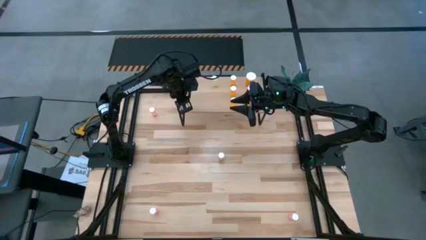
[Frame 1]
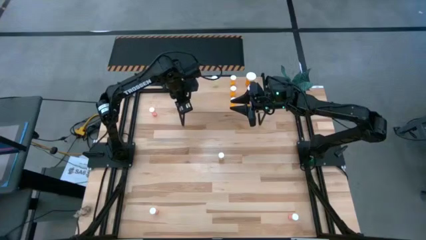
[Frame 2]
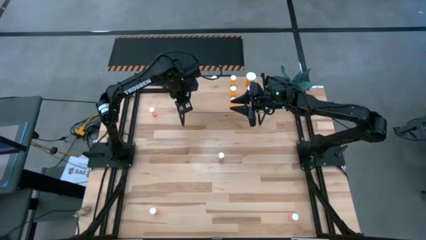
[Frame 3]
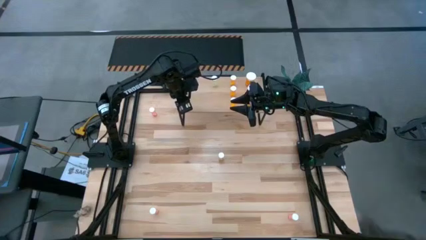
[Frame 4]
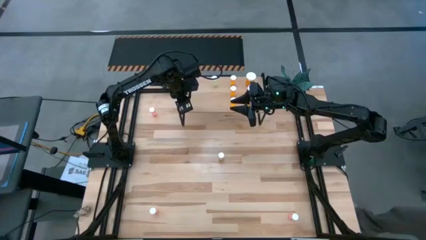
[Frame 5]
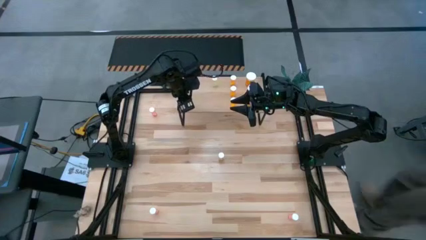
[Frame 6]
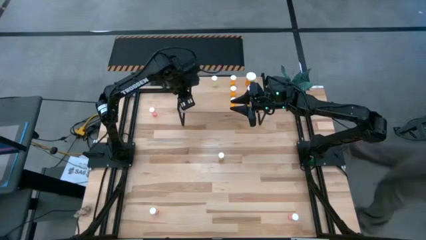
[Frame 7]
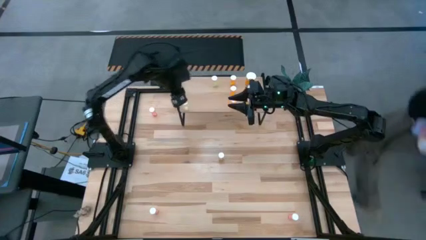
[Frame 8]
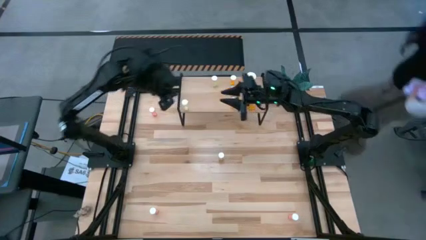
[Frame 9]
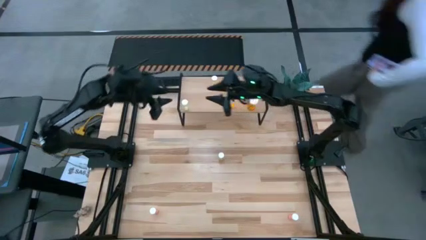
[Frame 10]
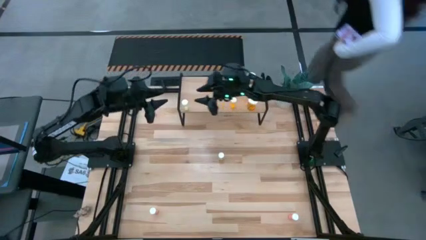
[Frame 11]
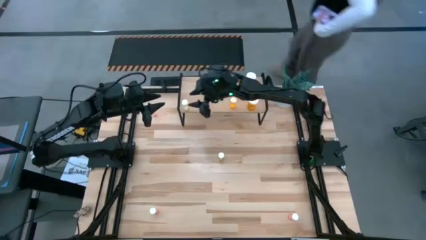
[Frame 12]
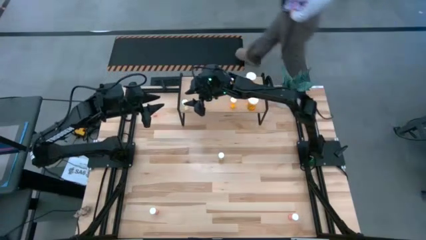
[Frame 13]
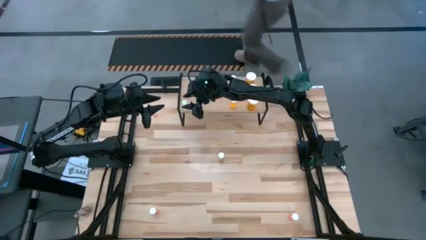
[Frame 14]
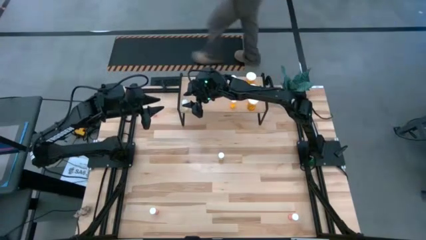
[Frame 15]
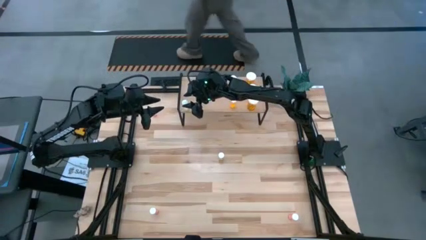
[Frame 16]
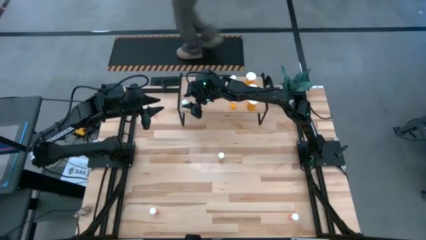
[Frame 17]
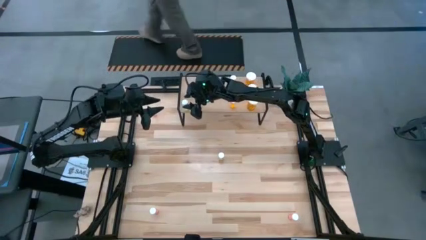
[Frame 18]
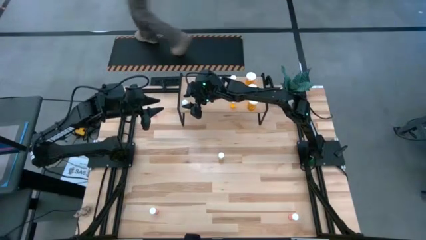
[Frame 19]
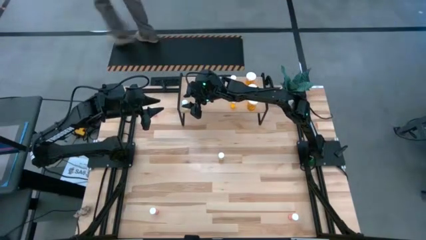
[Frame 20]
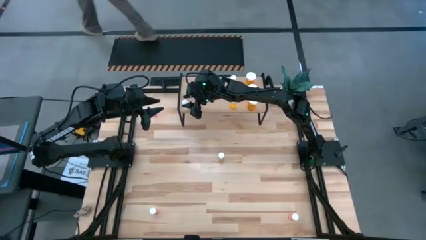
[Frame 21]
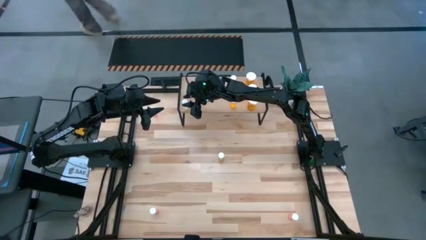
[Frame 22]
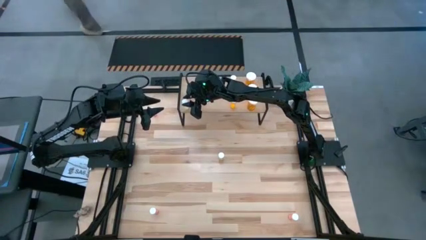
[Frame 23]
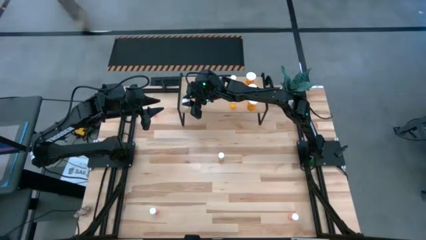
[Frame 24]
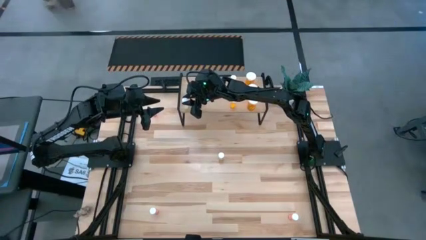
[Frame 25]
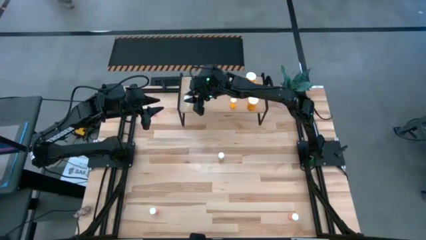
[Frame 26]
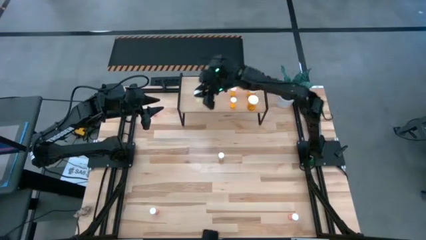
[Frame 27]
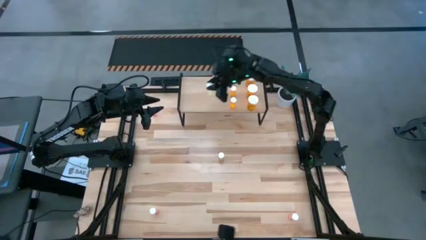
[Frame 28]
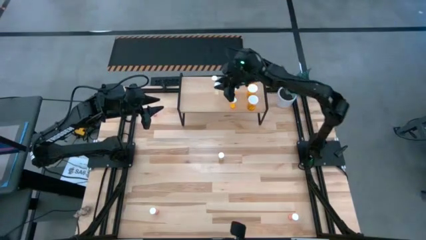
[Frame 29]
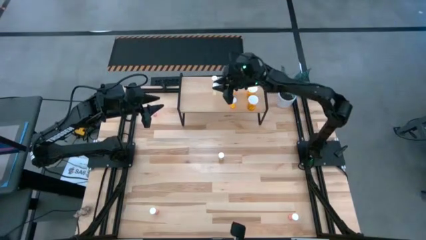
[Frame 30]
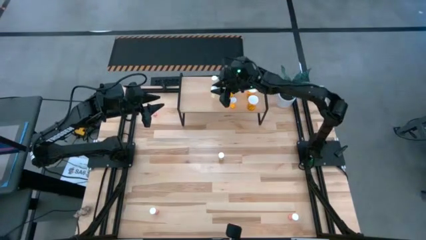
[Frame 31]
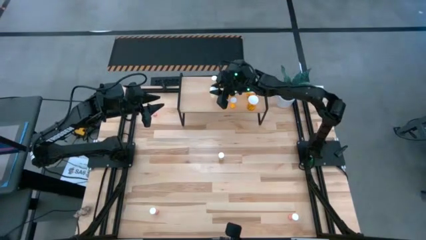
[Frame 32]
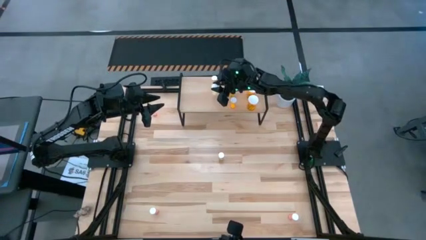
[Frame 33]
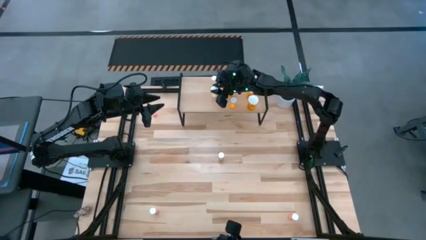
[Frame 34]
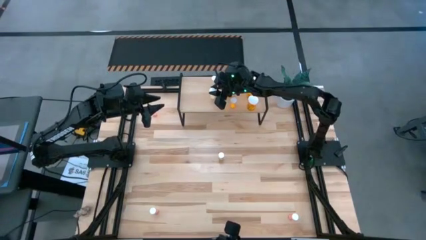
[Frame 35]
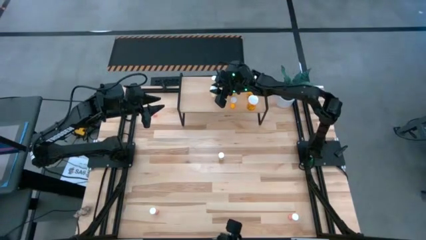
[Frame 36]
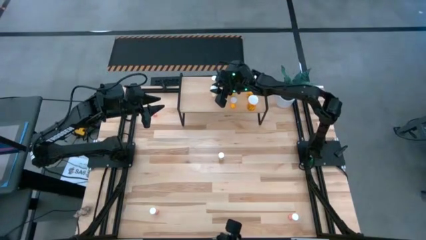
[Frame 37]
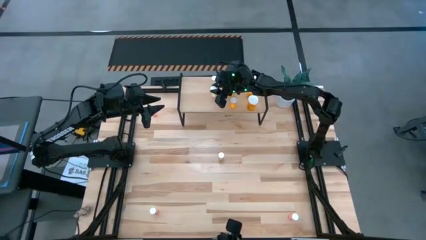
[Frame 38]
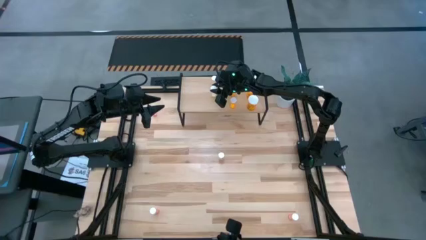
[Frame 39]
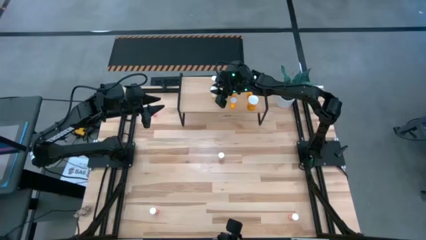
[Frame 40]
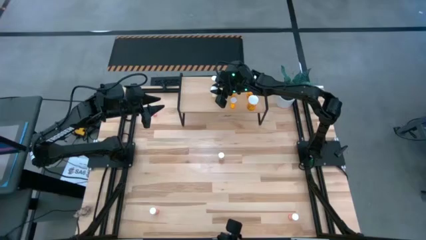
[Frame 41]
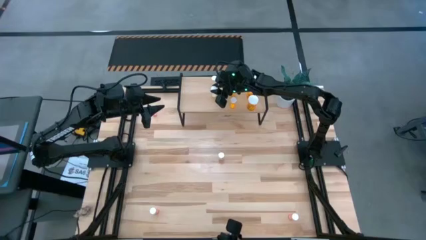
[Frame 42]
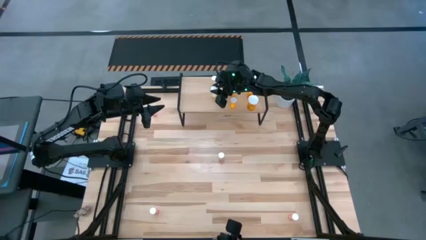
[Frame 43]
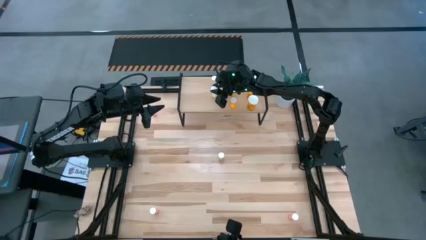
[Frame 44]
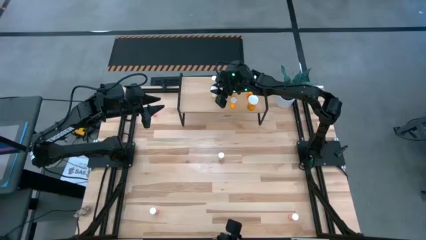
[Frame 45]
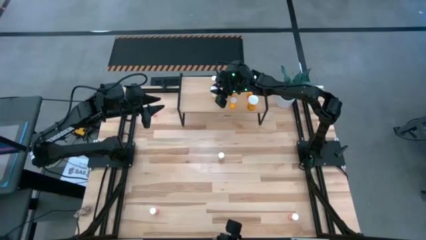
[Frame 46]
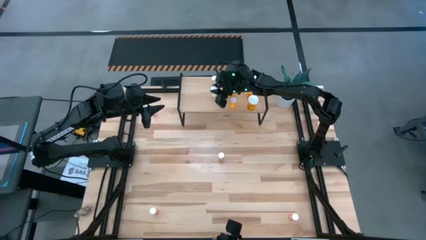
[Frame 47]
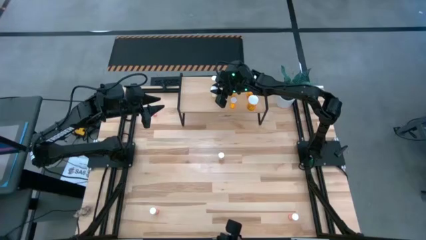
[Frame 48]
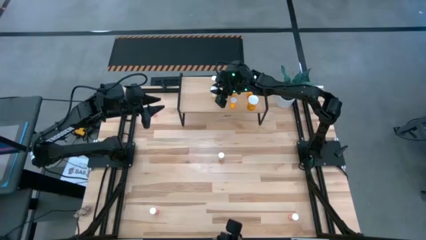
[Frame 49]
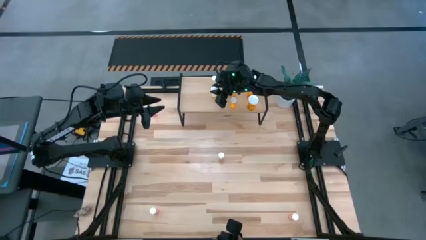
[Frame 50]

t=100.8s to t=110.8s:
Task: Pick and place medicine bottles onto shelf by color
Put the bottom yellow pill bottle on the shelf aligned with the other small yellow pill bottle

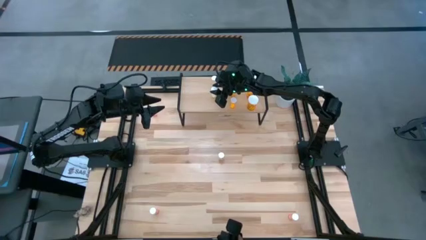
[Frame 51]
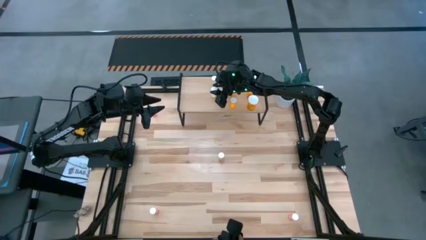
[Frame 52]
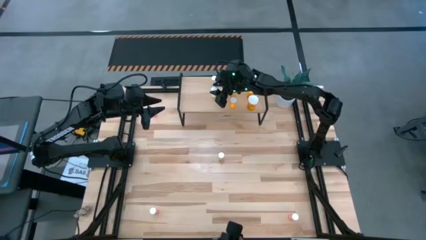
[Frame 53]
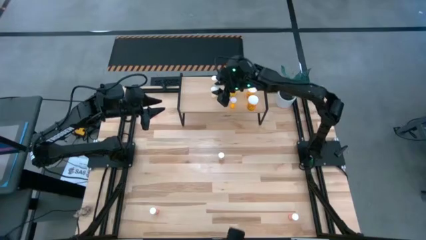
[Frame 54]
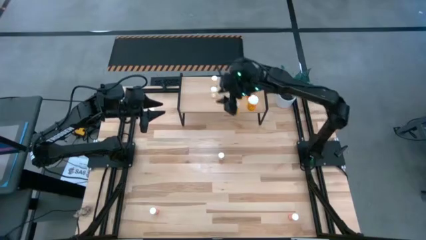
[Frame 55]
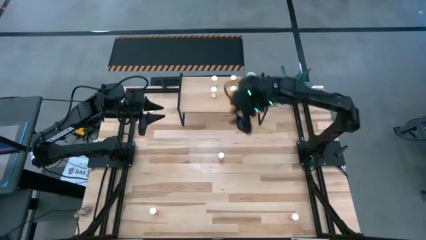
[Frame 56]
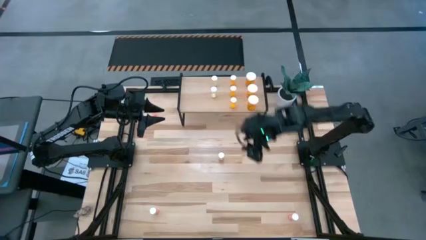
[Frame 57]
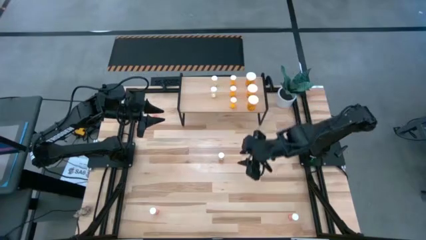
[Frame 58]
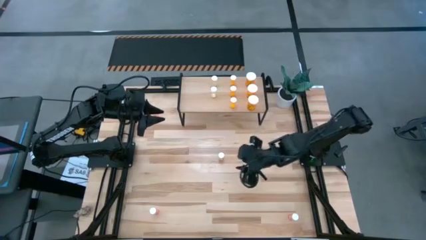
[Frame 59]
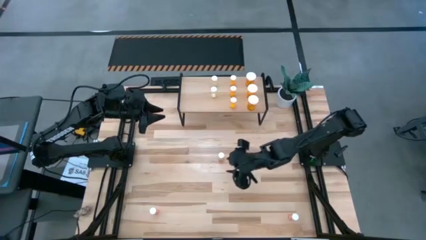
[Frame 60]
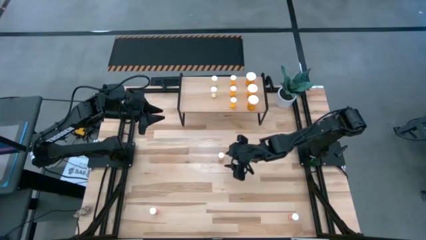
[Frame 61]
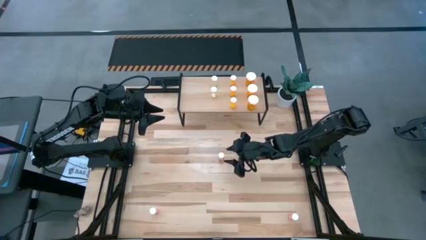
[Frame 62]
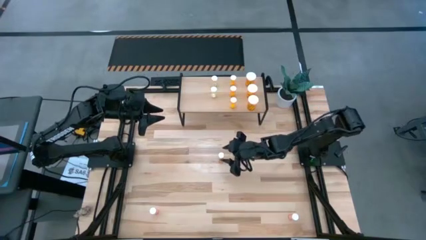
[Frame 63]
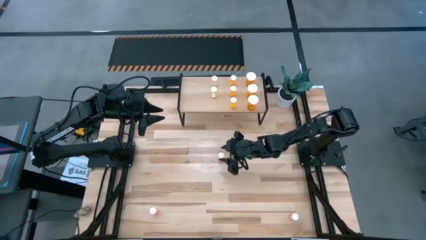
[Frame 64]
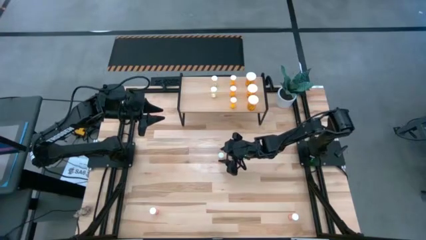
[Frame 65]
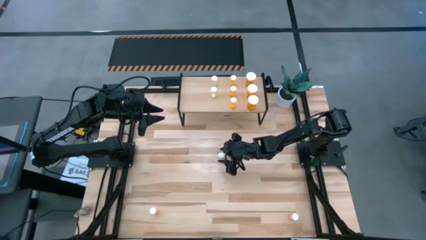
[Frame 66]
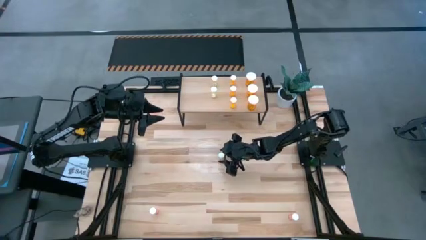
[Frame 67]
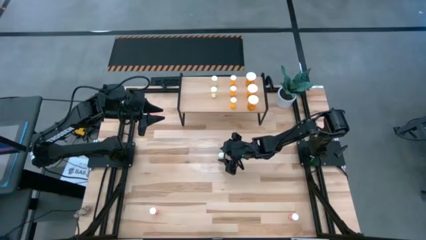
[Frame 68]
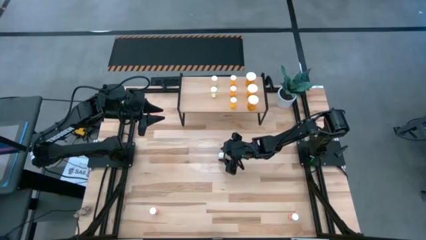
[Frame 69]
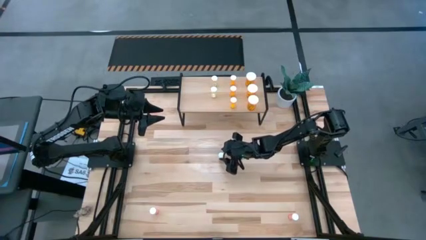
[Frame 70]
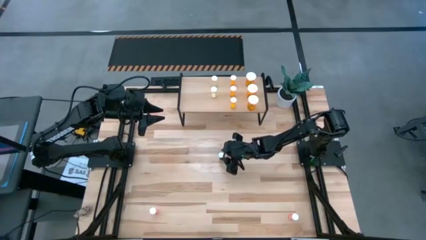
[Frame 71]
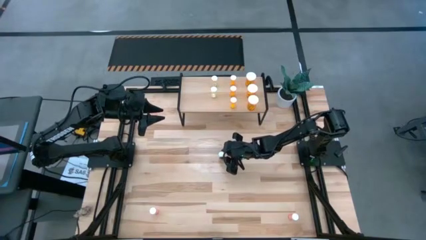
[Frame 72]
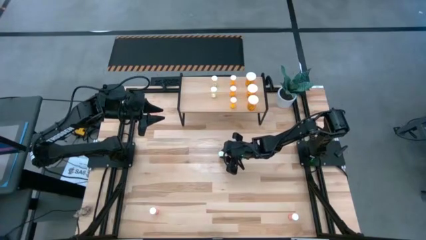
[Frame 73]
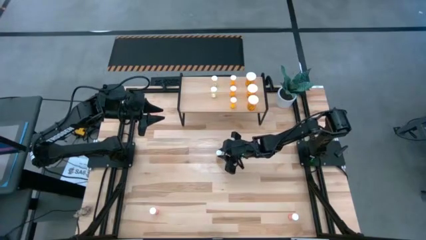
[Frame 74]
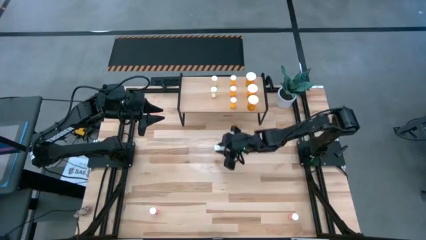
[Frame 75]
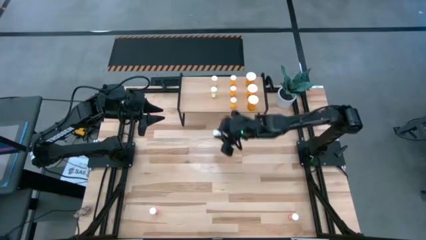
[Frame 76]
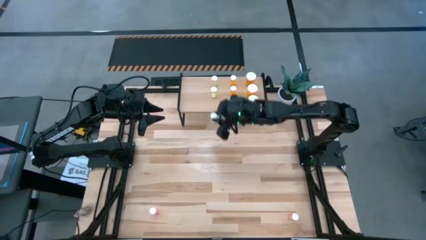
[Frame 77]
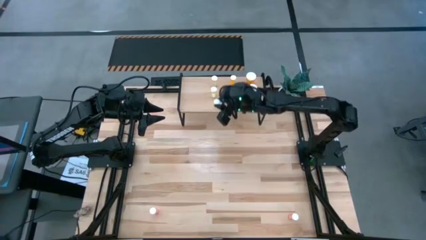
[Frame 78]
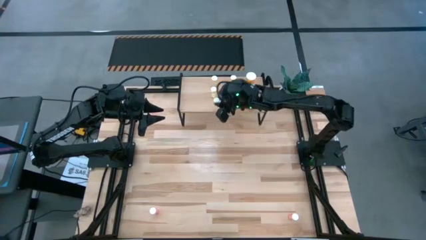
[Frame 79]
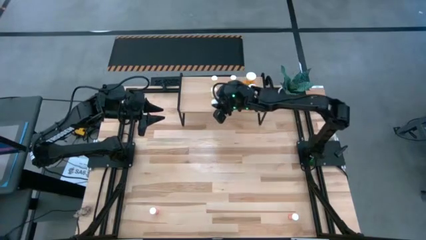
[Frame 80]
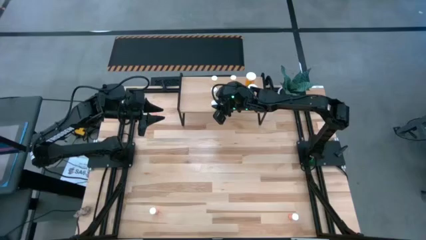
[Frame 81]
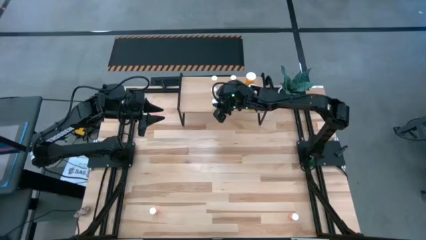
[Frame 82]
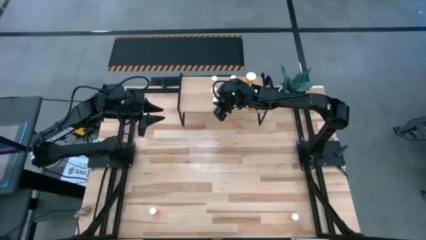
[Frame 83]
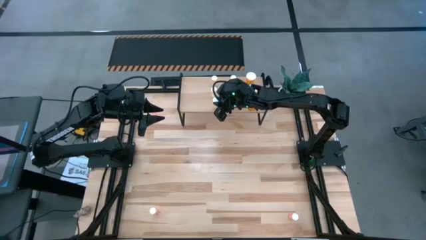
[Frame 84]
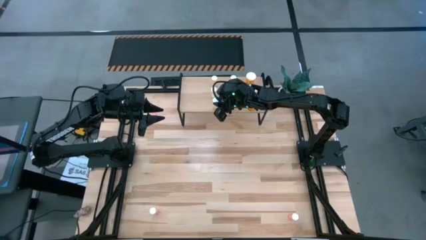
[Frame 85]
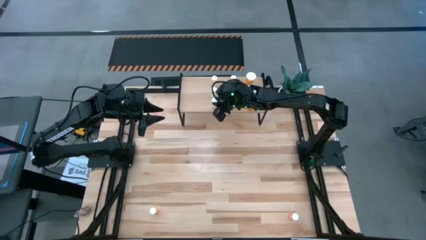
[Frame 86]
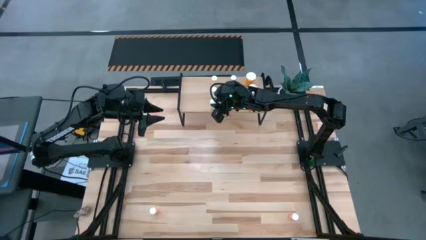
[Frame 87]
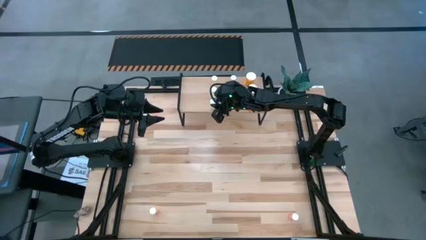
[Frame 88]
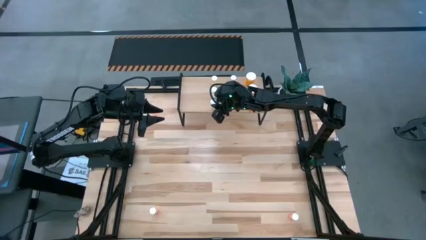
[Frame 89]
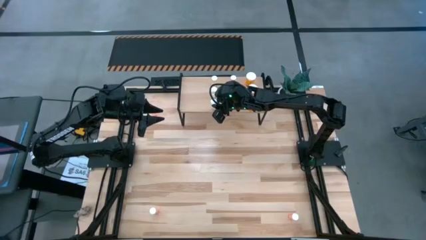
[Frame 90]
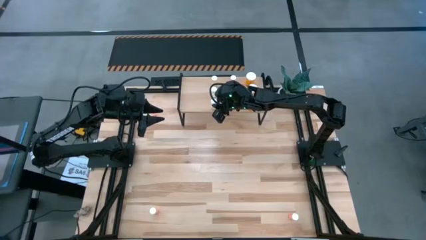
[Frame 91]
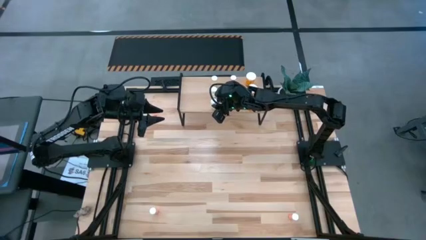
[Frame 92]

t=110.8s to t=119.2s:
Put the yellow pill bottle on the shelf aligned with the other small yellow pill bottles
